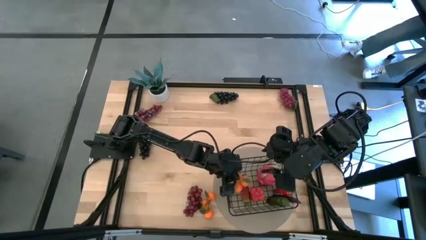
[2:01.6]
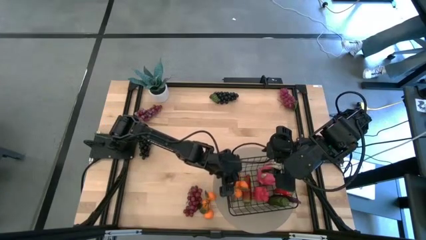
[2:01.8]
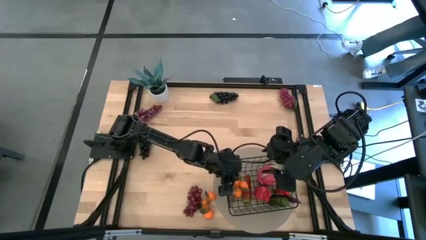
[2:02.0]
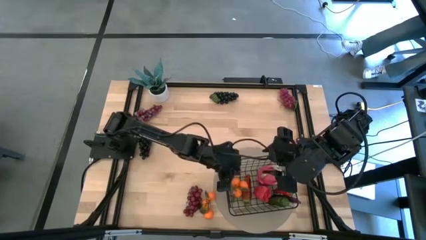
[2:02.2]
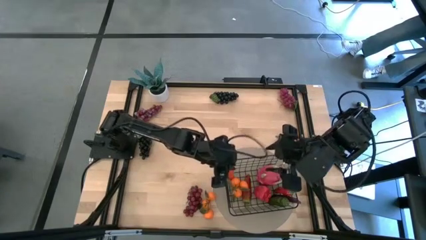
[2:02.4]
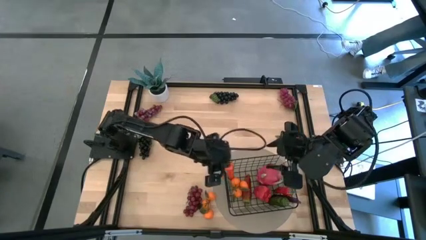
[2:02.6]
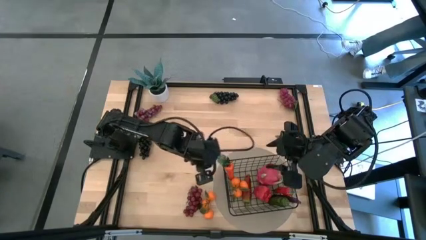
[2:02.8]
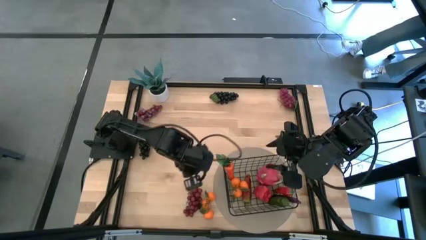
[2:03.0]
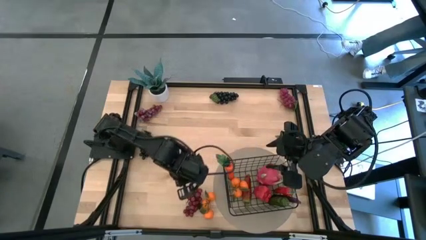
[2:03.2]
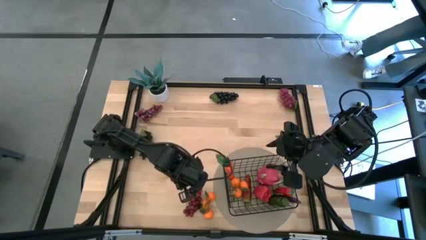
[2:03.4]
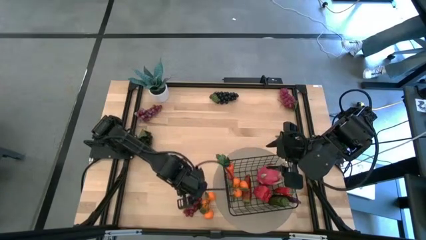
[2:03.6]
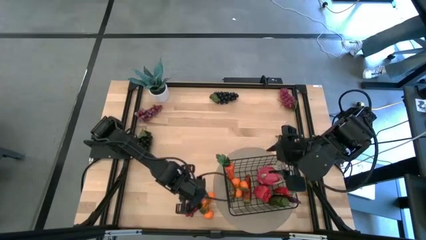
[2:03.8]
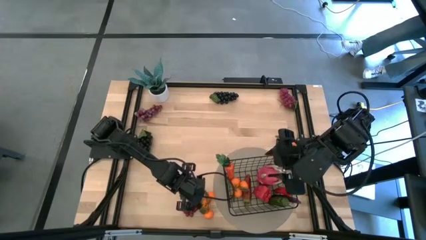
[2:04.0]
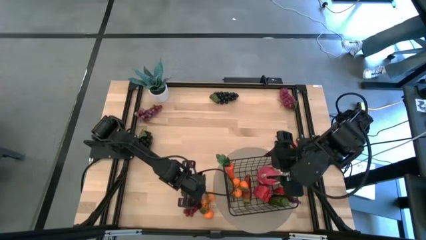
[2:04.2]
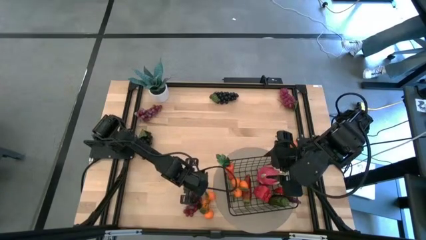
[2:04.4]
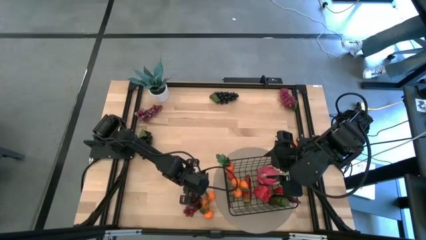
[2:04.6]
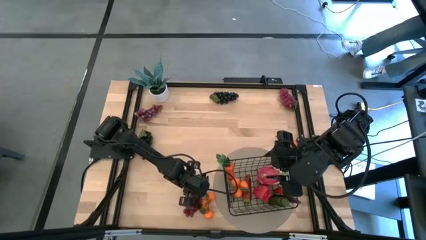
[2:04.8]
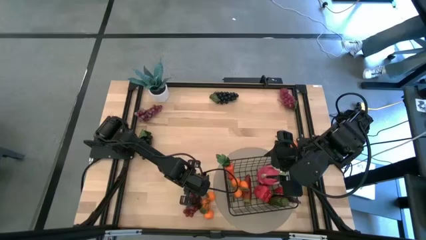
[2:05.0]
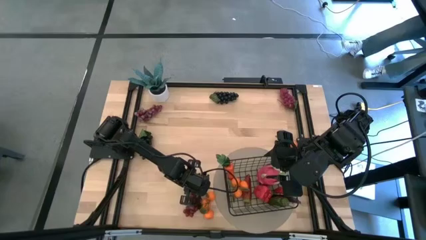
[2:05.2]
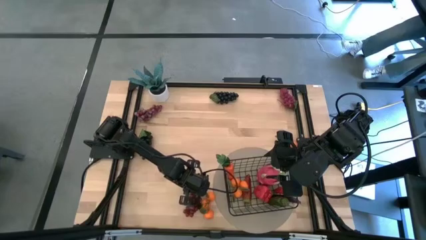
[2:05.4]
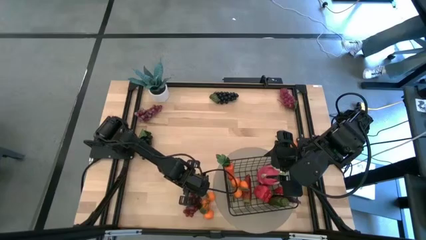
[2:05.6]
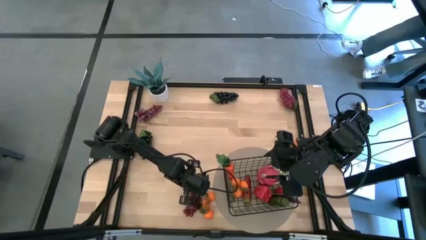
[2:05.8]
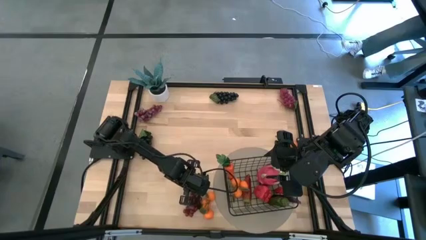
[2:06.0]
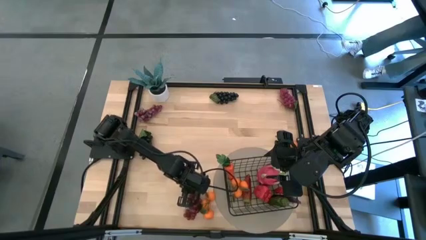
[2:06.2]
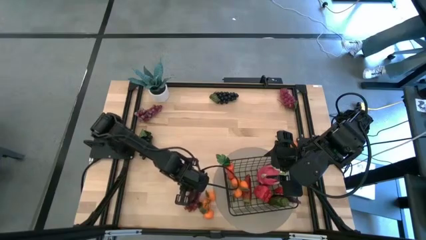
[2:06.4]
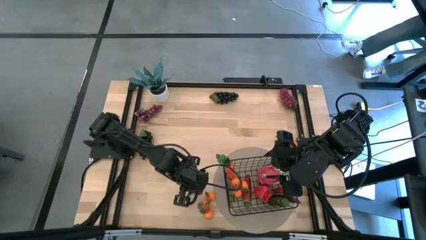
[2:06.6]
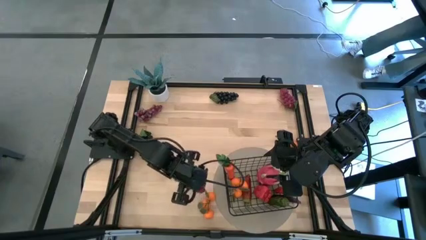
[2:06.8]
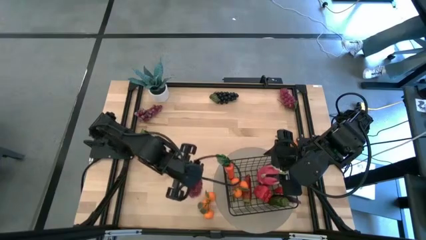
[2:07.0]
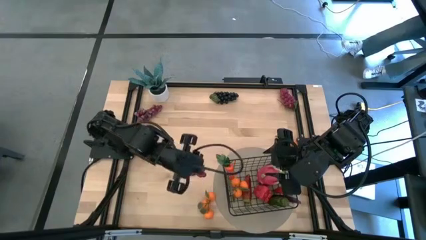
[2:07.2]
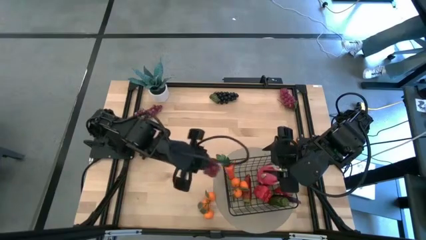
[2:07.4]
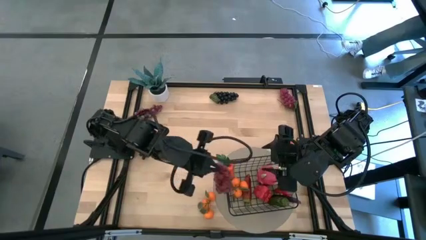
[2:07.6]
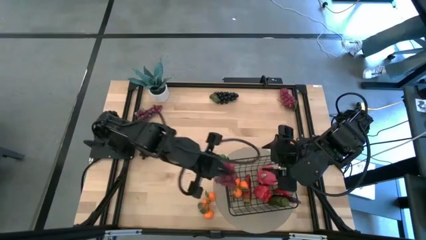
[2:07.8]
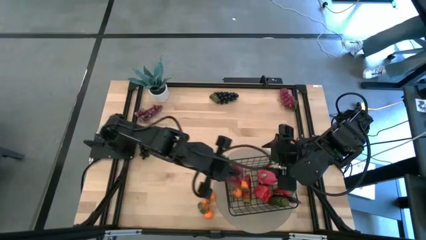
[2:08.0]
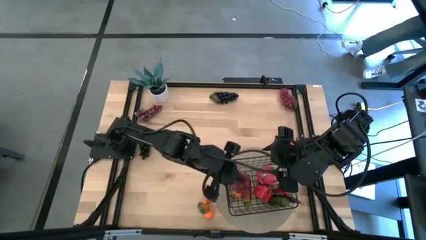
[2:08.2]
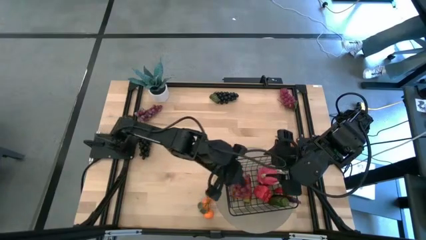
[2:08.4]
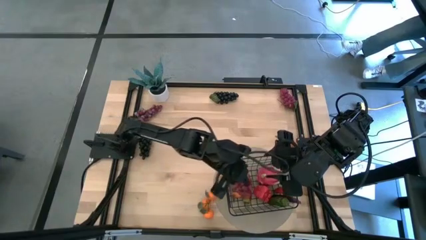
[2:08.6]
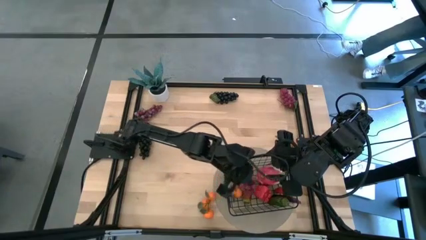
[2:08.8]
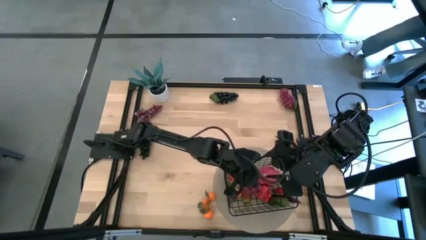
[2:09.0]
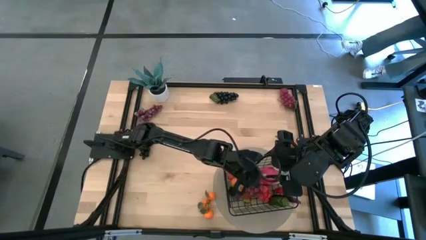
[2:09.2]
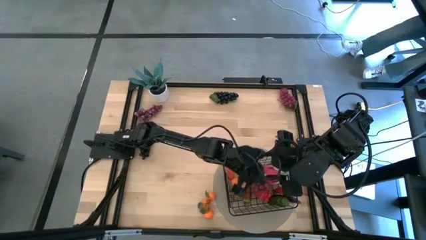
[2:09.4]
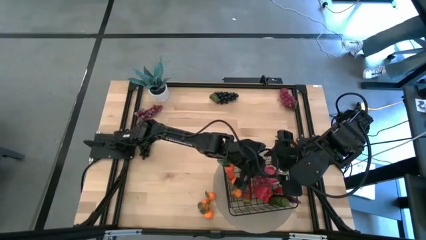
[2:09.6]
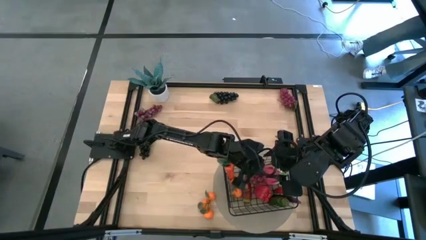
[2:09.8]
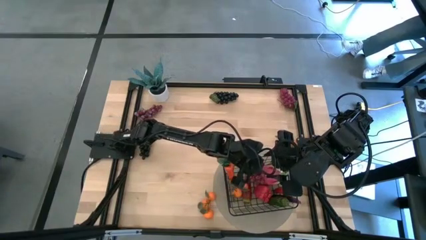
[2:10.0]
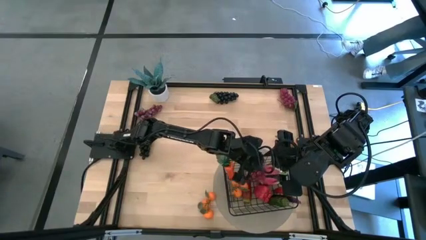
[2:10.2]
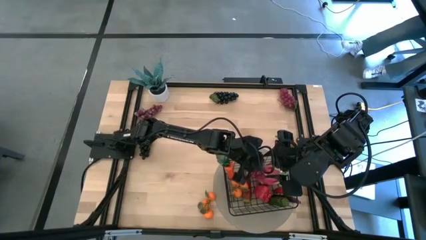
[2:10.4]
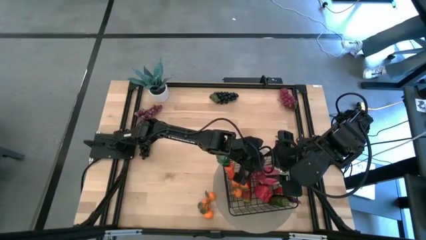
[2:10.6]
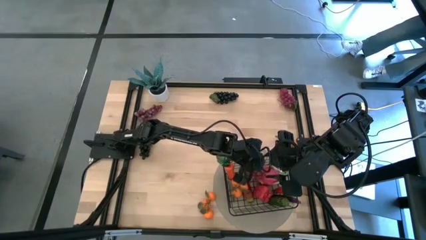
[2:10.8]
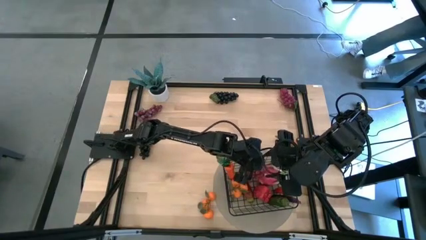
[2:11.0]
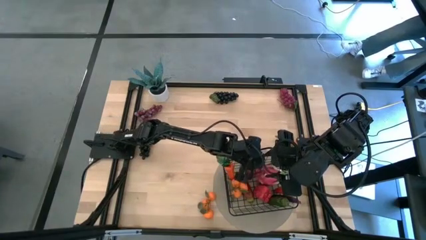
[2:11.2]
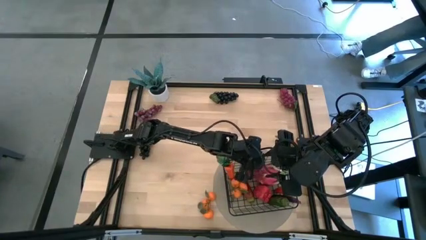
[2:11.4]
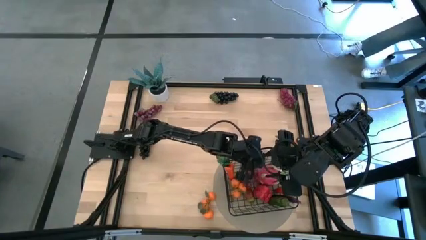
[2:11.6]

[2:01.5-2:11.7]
Task: Build produce basket
Put the bottom center grapes into the wire basket

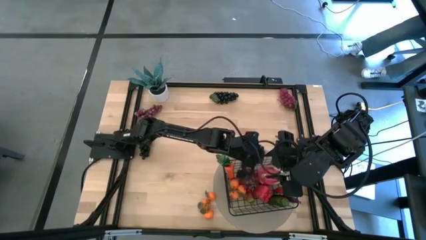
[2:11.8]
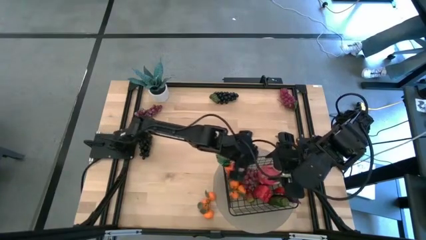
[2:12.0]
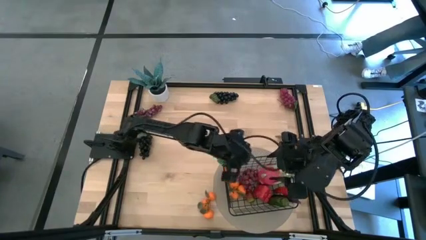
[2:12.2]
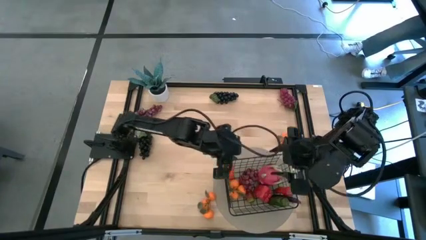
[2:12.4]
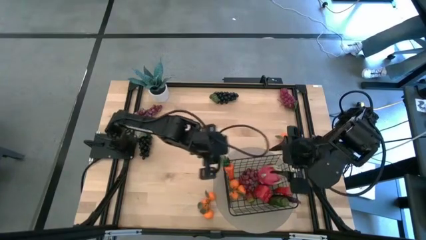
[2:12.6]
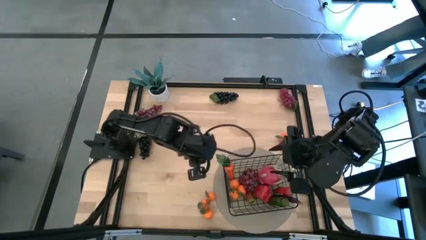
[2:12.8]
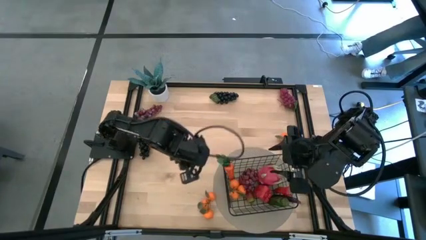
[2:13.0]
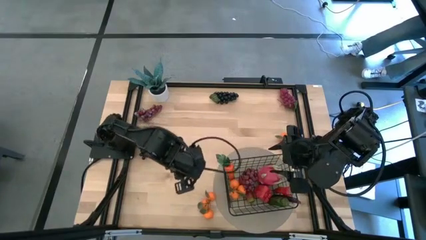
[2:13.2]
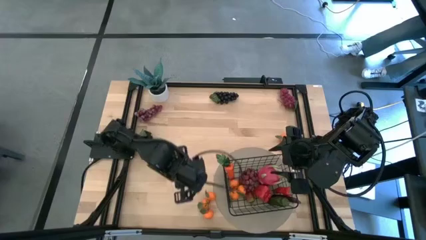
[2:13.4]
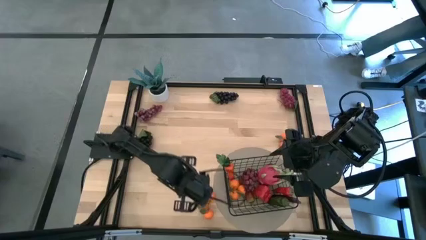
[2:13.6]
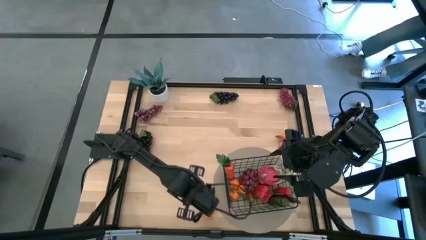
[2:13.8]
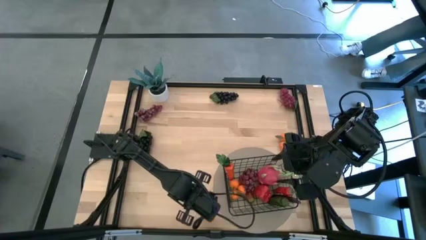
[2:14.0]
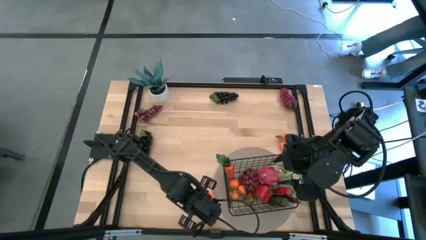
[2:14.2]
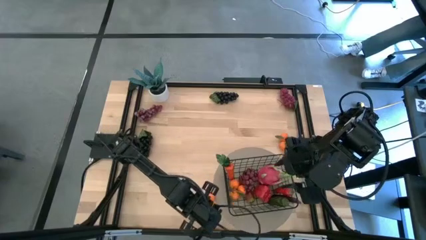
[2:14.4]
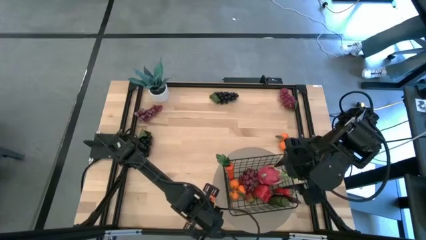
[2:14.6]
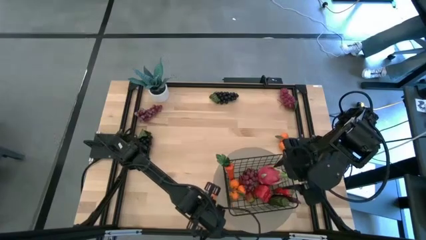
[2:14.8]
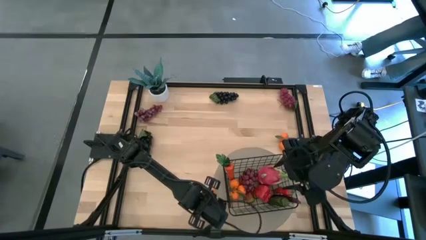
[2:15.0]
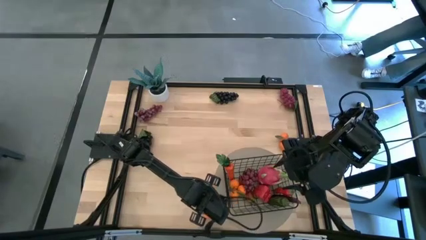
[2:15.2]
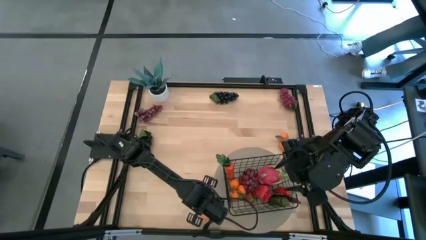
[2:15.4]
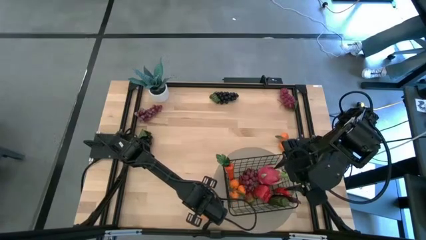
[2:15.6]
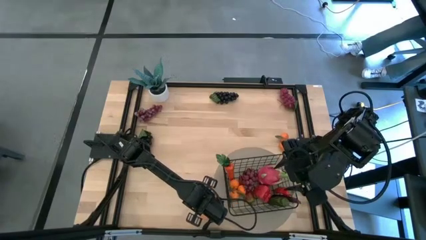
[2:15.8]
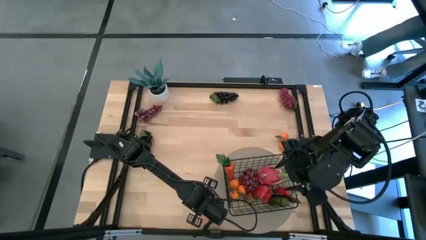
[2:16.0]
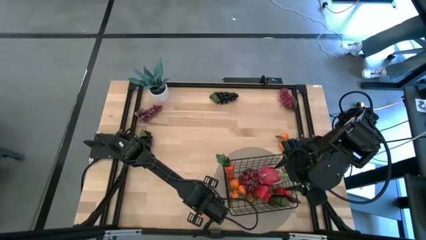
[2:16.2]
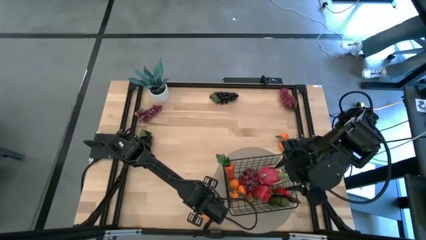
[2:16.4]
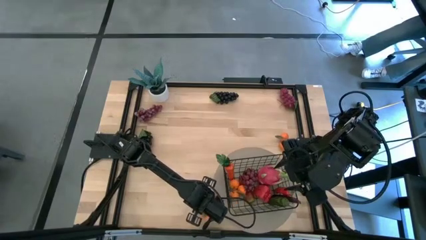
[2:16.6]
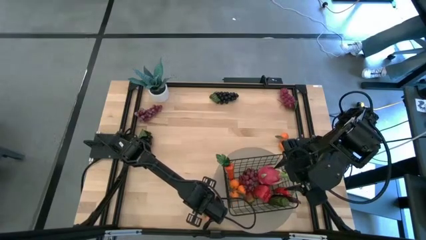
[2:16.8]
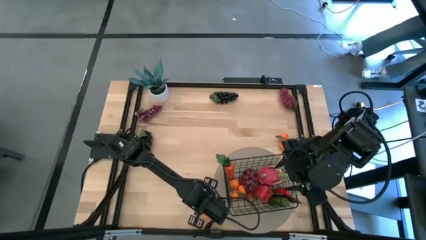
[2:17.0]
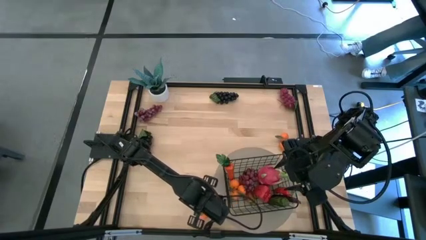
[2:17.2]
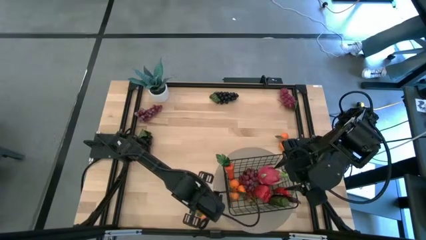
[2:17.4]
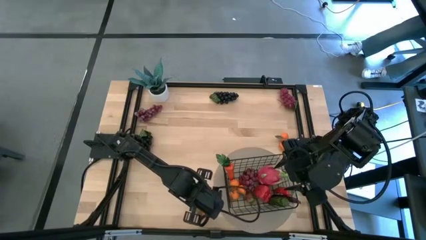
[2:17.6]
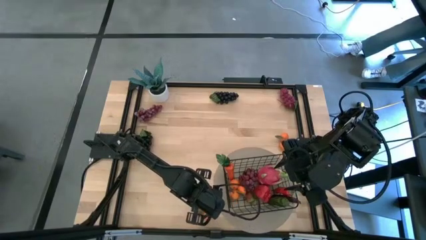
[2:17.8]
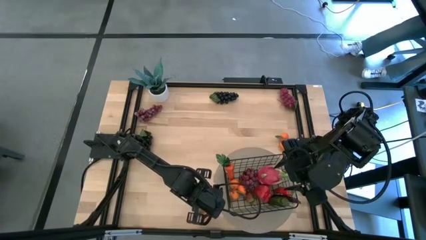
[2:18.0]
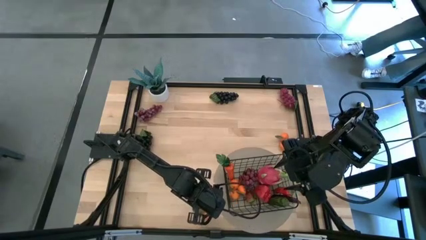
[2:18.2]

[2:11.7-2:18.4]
Put the bottom center orange into the wire basket
